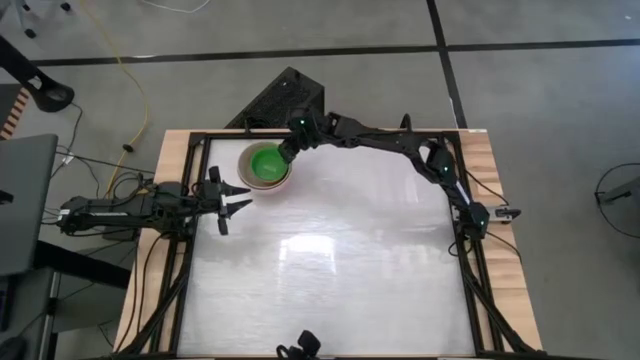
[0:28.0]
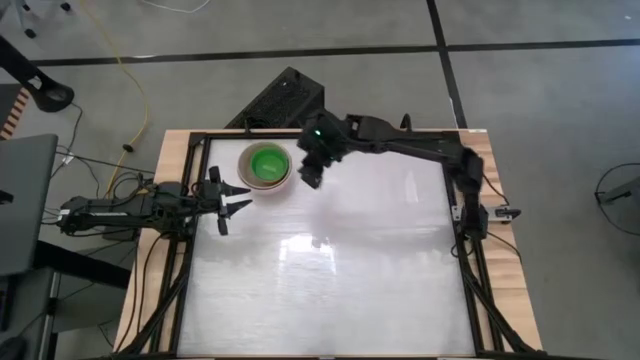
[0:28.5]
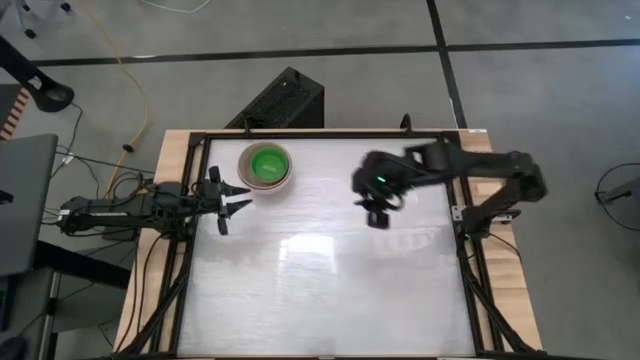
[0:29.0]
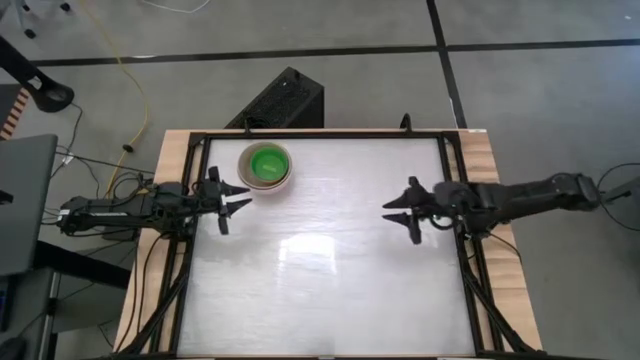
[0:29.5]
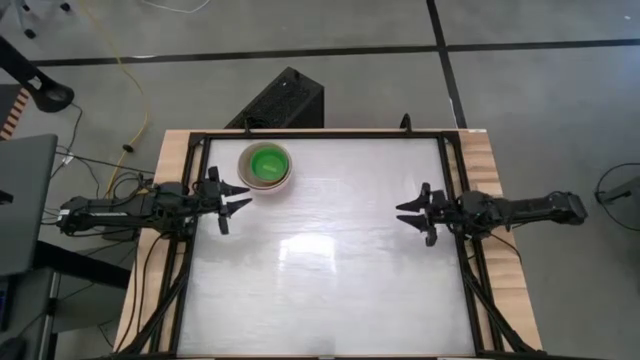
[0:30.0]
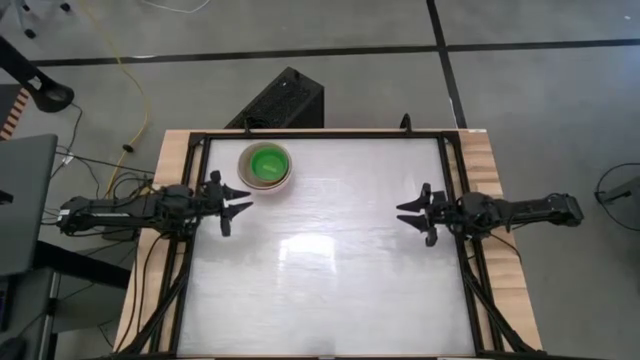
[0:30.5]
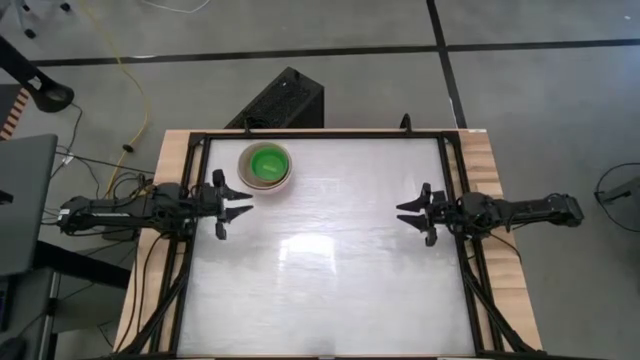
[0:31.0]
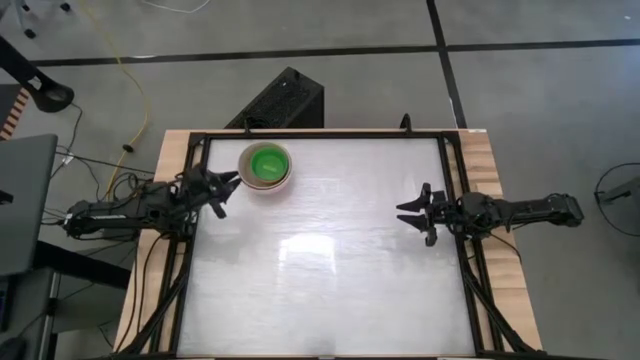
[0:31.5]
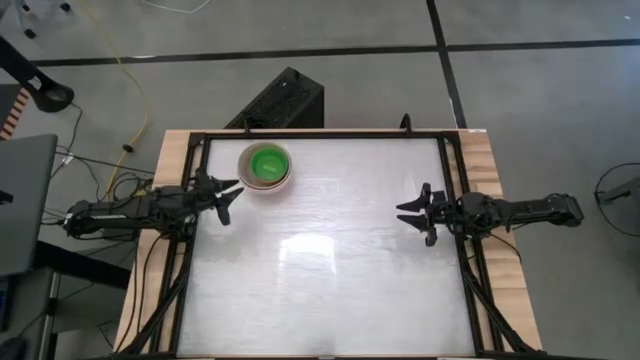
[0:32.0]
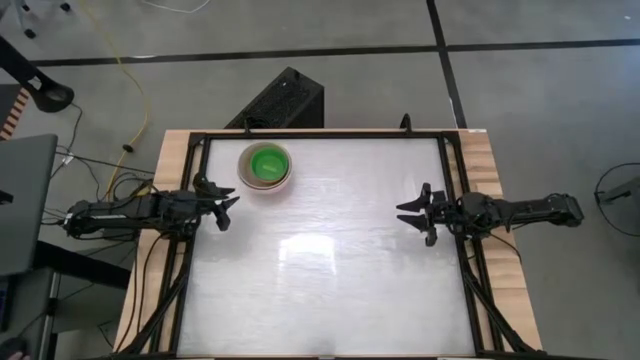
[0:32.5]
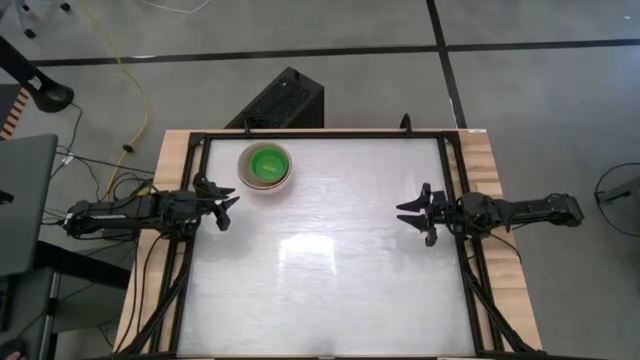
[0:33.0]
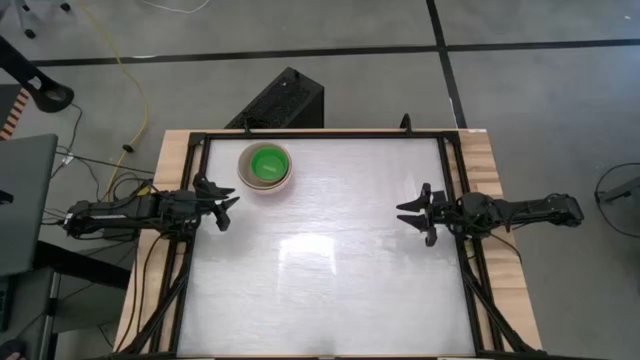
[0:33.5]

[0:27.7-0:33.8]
Return to Home Position

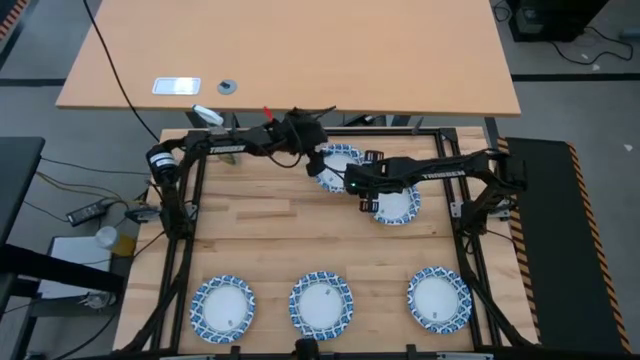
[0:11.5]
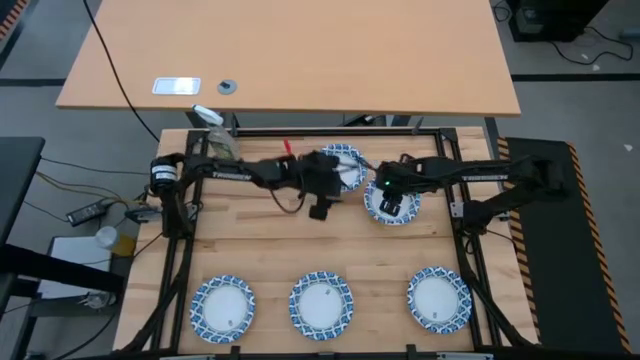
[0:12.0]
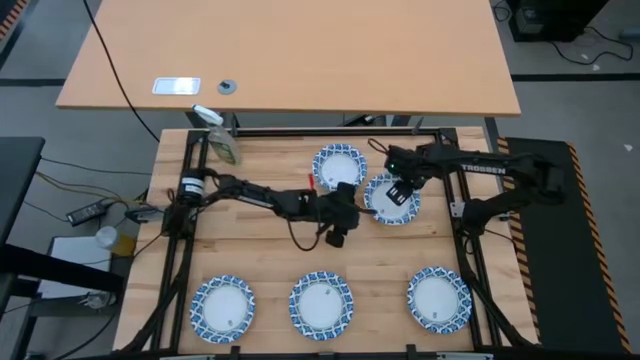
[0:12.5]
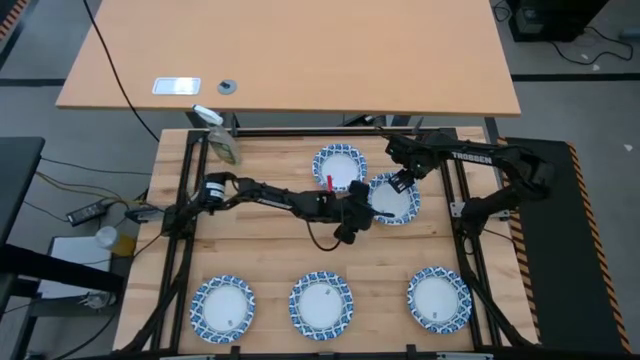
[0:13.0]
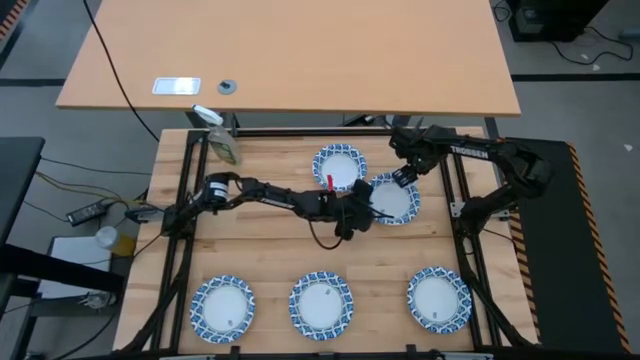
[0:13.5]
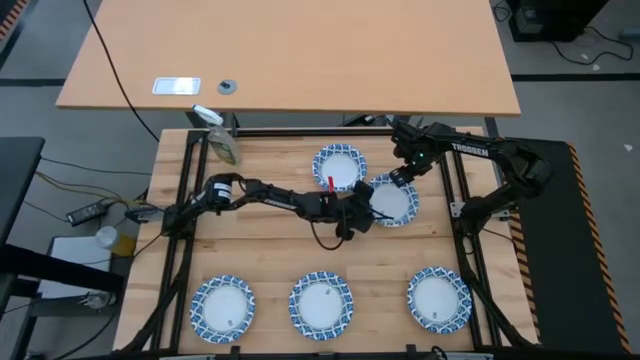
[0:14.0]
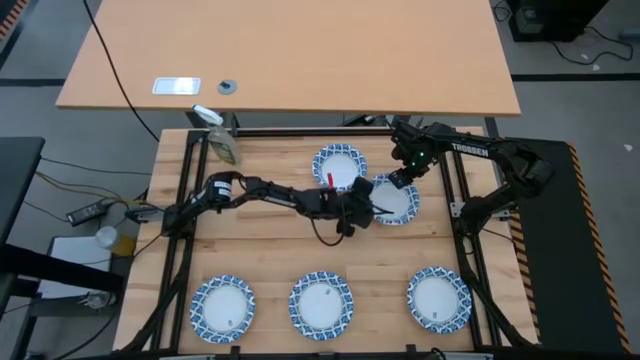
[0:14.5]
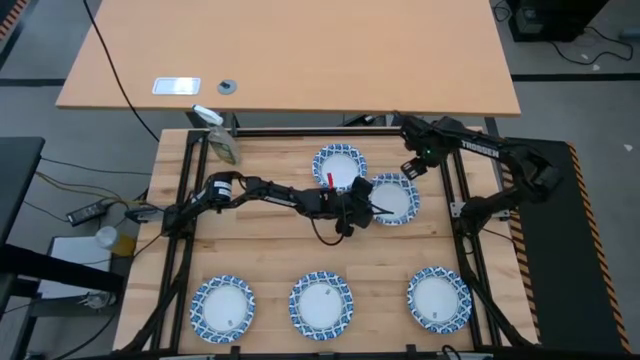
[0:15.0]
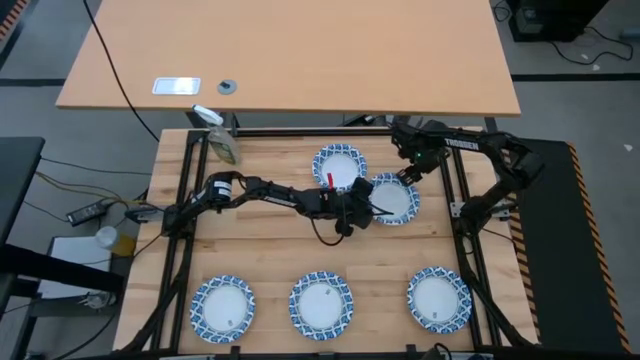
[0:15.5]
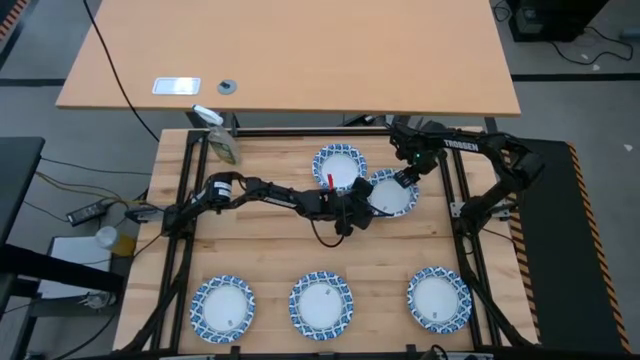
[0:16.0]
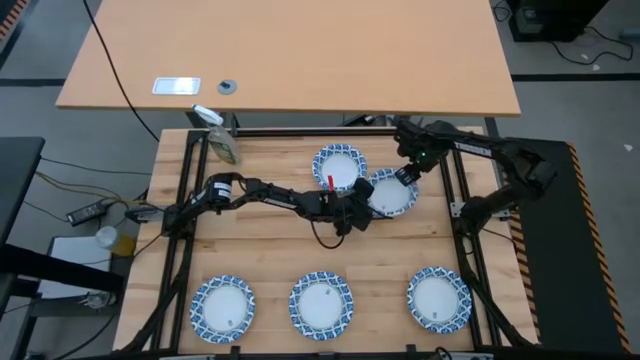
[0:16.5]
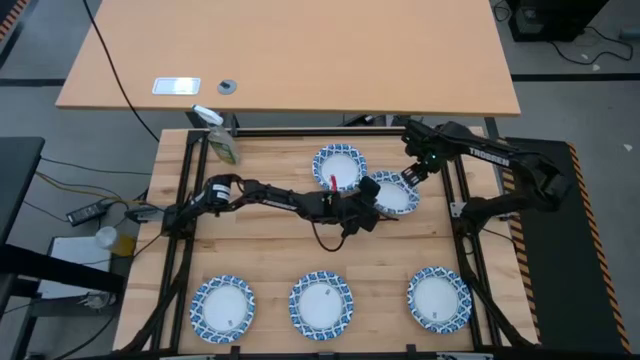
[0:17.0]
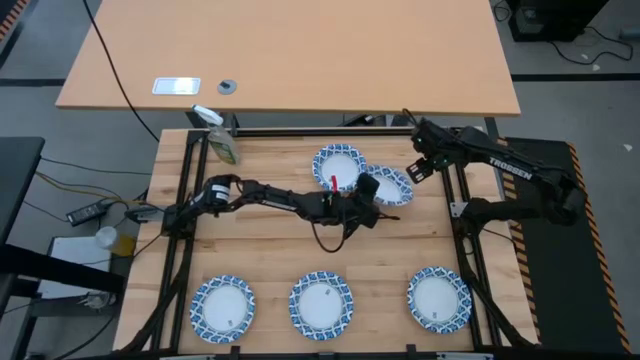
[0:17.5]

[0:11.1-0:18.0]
Stack the blue white patterned bowl on top of the other blue white patterned bowls

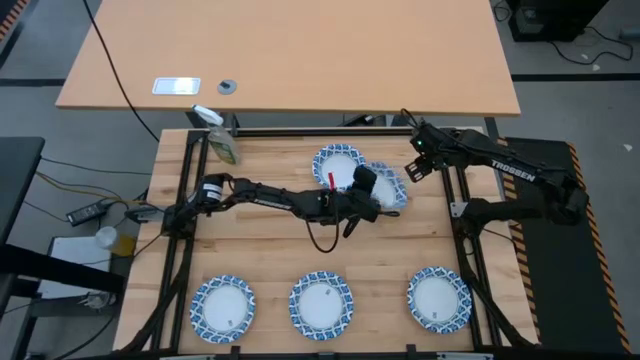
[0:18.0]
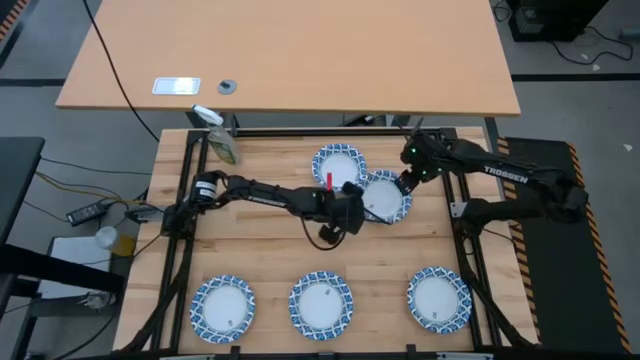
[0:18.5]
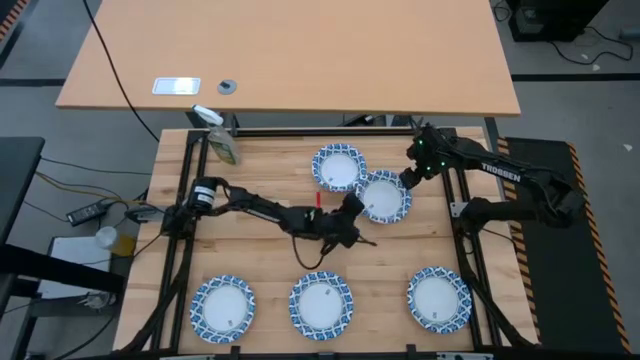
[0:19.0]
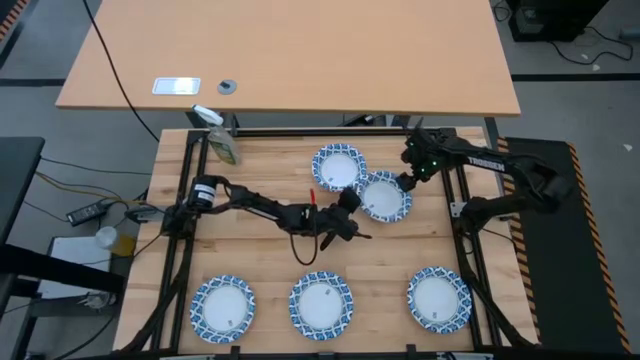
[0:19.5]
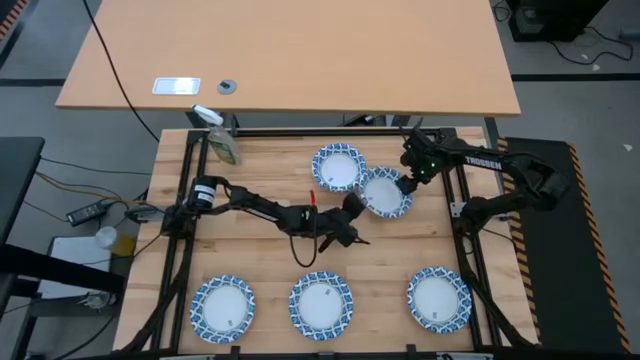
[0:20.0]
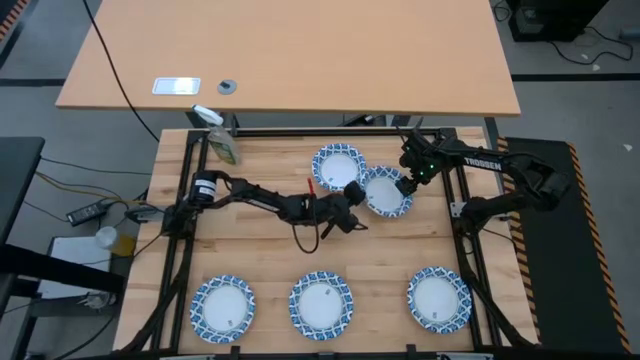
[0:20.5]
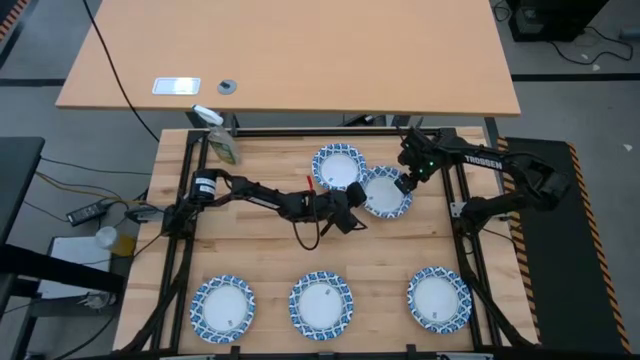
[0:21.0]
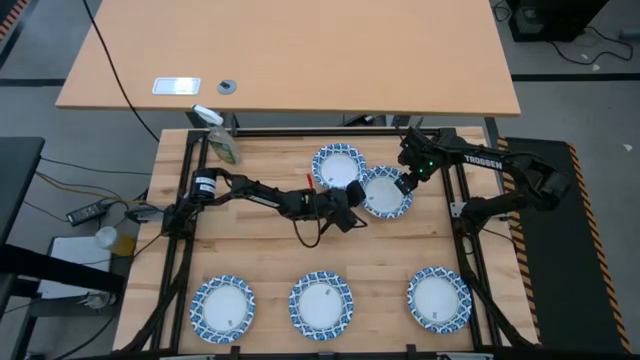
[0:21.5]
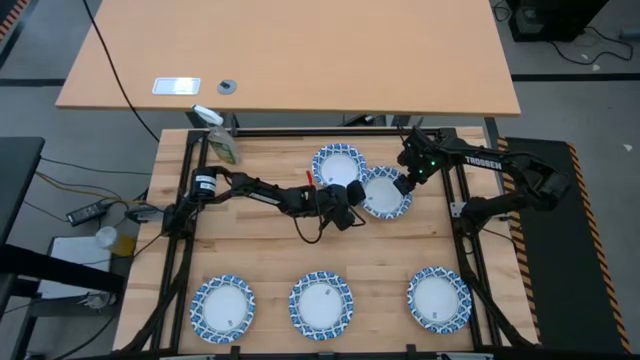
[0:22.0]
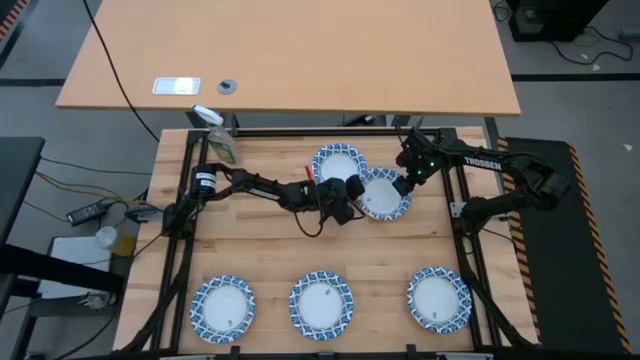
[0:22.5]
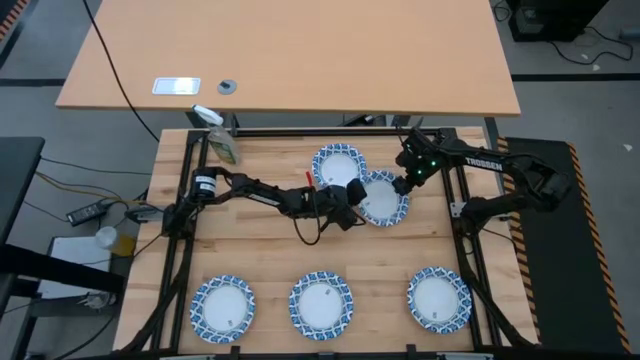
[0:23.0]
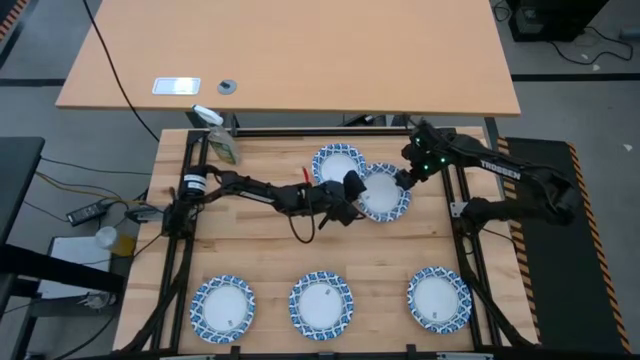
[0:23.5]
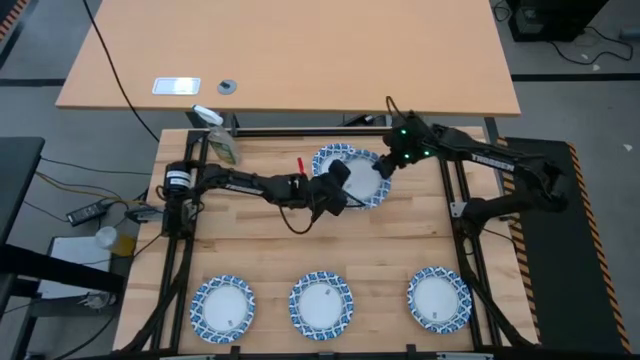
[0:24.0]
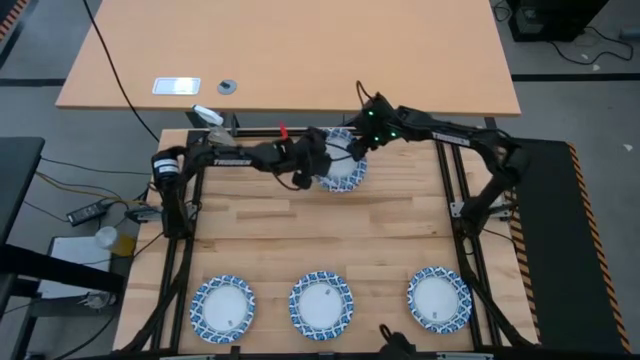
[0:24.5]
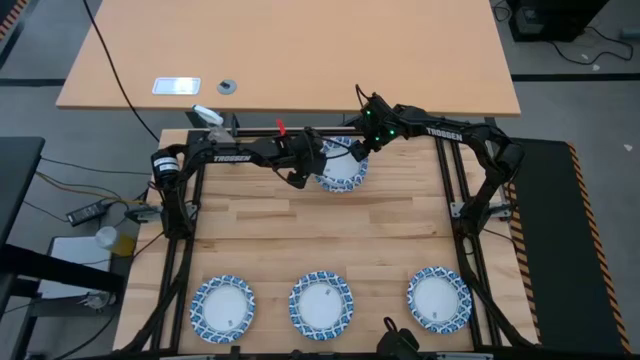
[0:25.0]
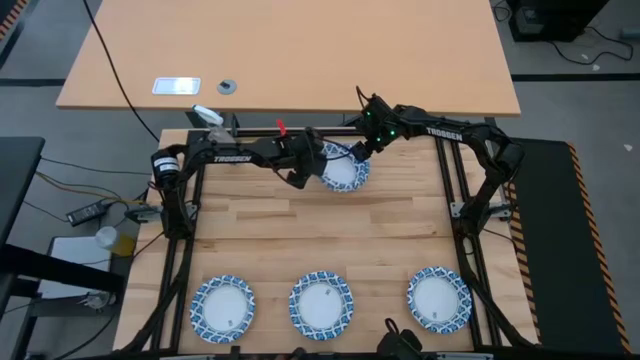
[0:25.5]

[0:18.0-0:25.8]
Stack the blue white patterned bowl on top of the other blue white patterned bowls

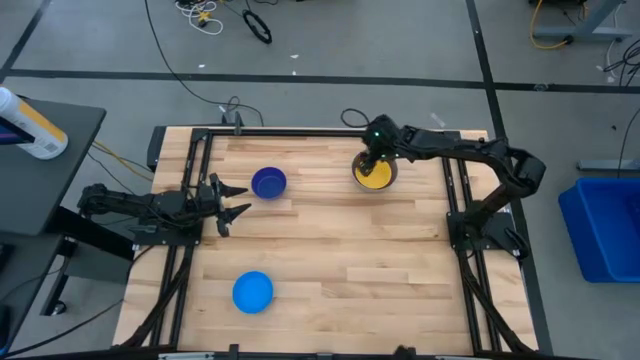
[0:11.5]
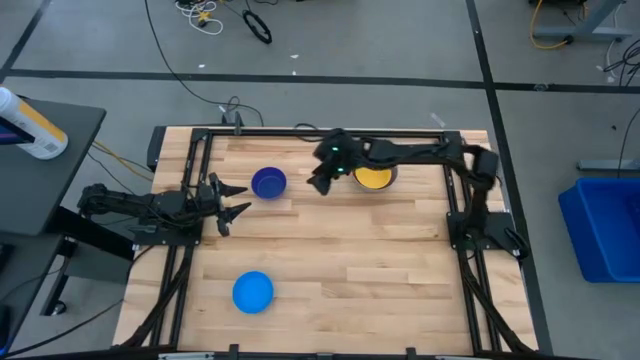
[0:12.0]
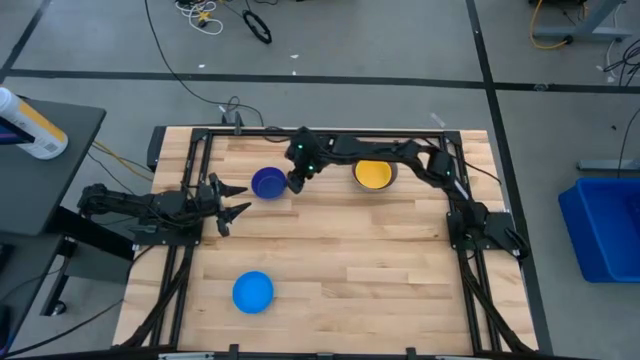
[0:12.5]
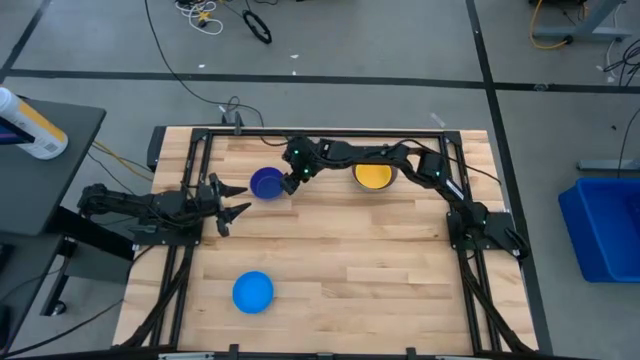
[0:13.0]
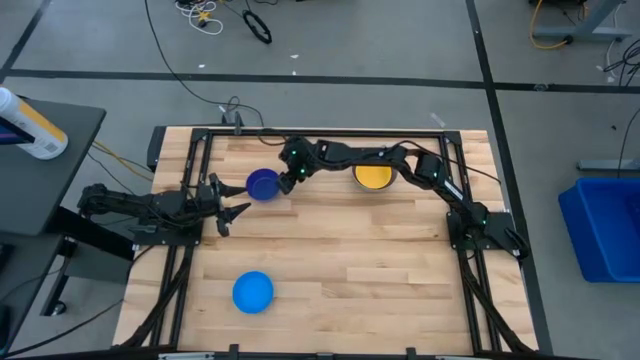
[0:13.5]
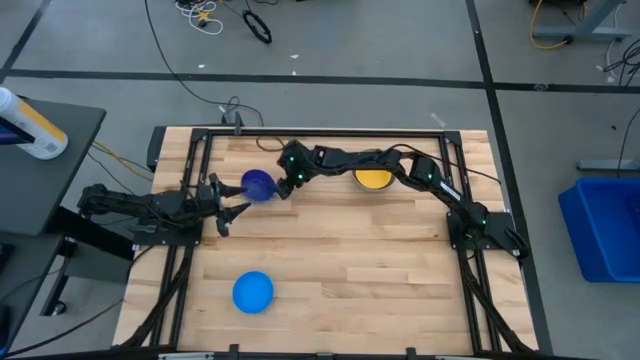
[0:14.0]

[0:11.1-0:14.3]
Stack the dark blue bowl on the yellow bowl
